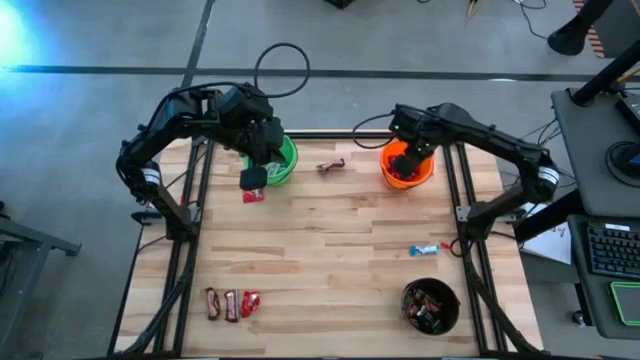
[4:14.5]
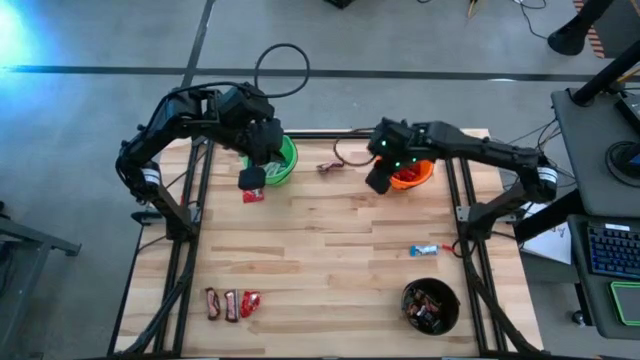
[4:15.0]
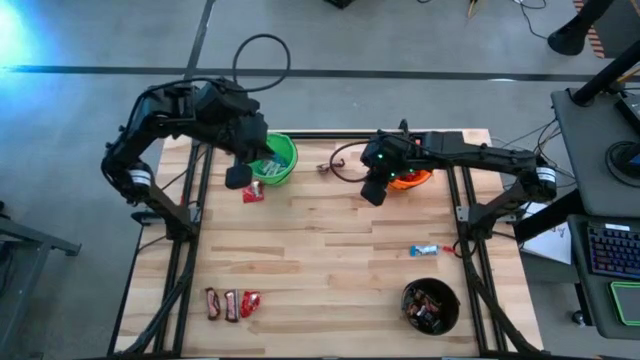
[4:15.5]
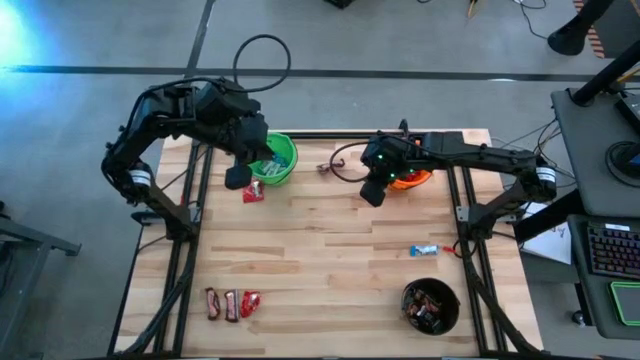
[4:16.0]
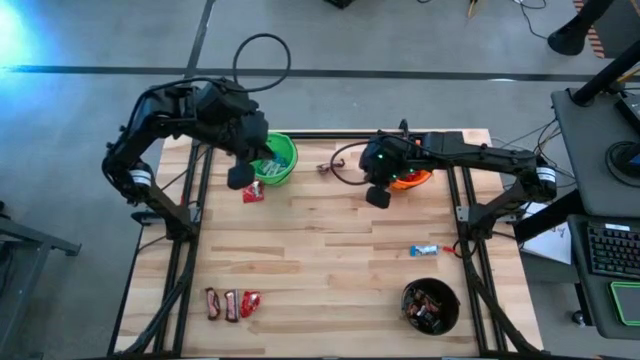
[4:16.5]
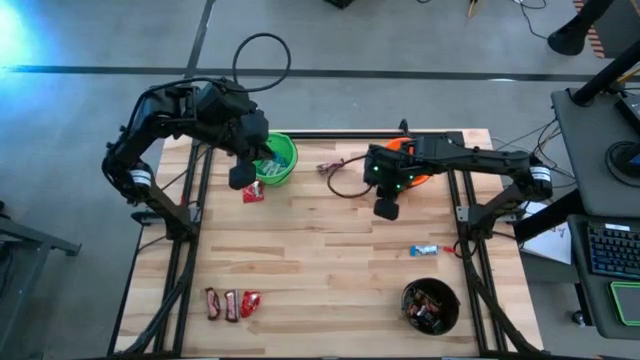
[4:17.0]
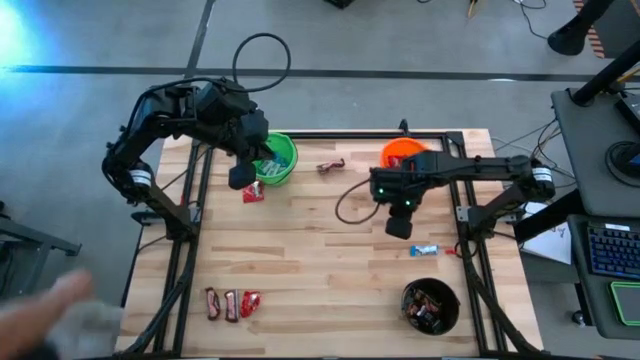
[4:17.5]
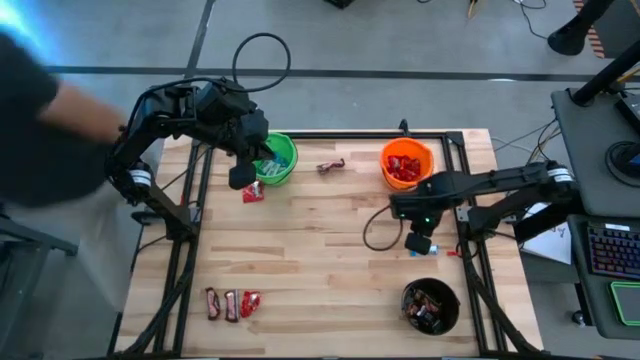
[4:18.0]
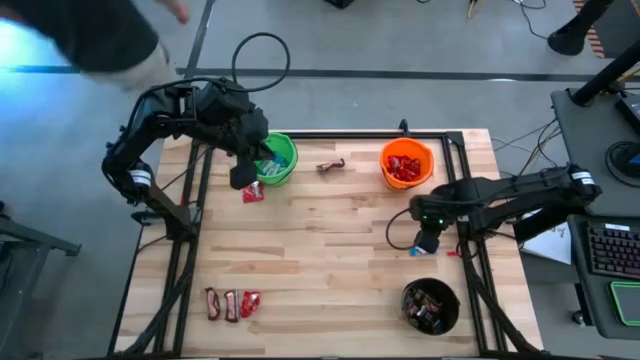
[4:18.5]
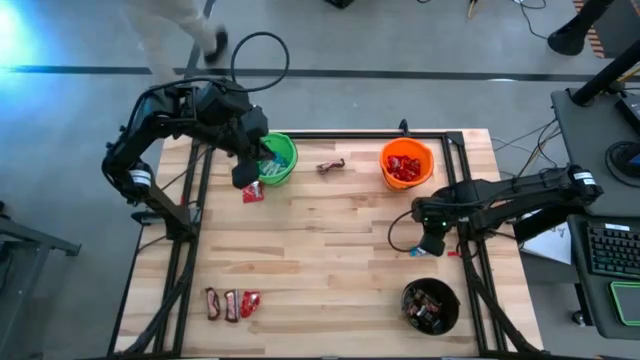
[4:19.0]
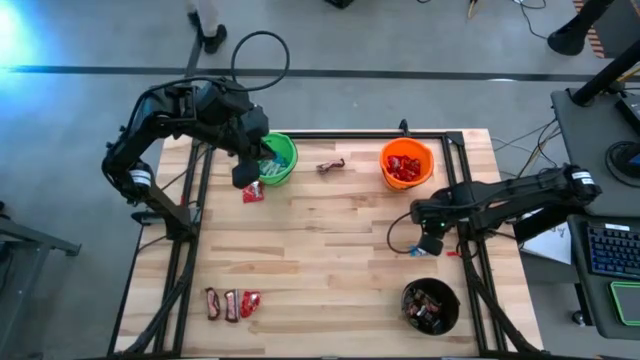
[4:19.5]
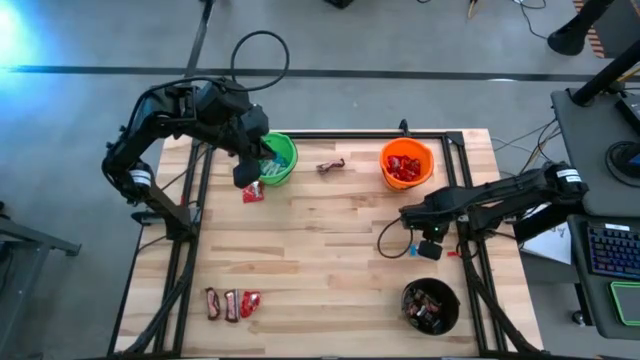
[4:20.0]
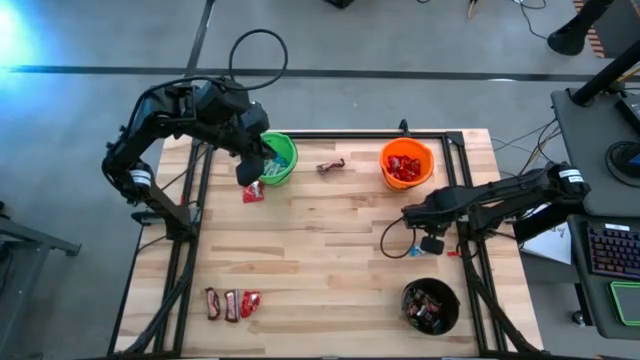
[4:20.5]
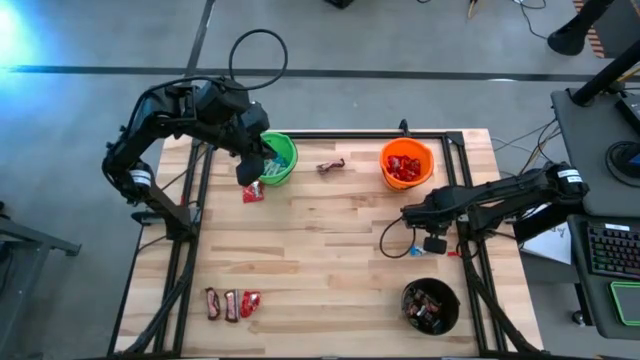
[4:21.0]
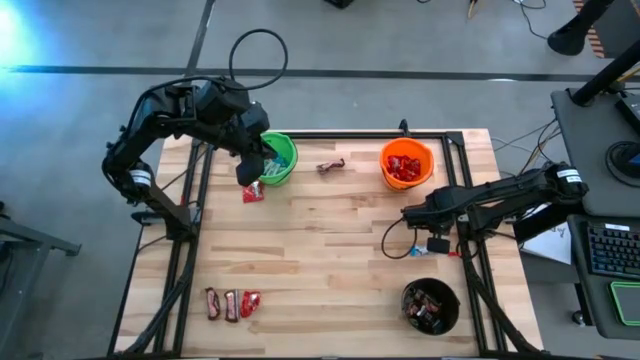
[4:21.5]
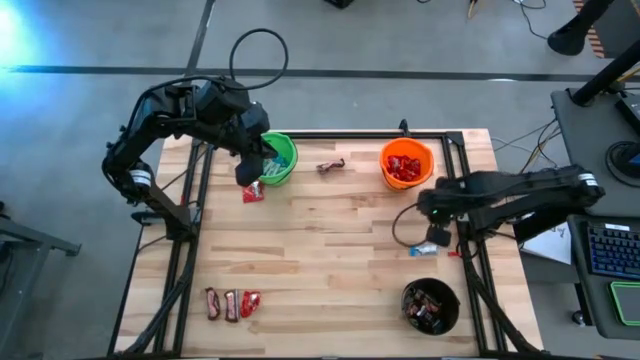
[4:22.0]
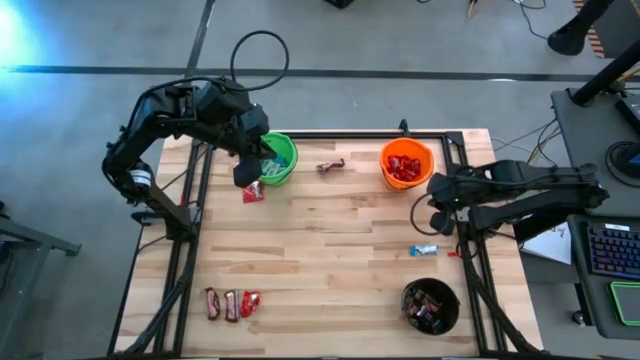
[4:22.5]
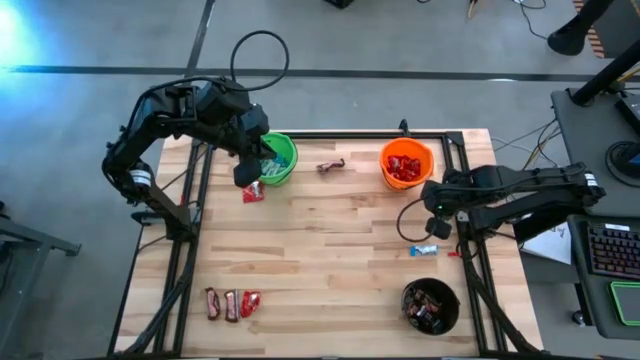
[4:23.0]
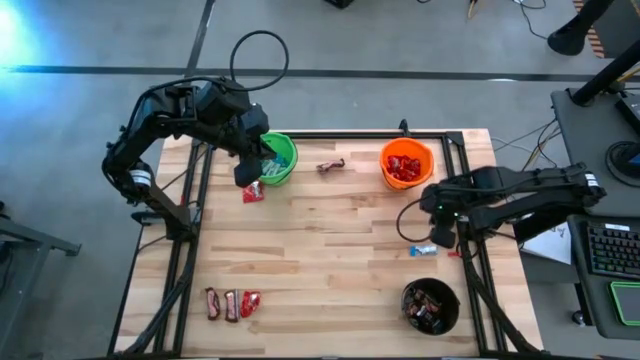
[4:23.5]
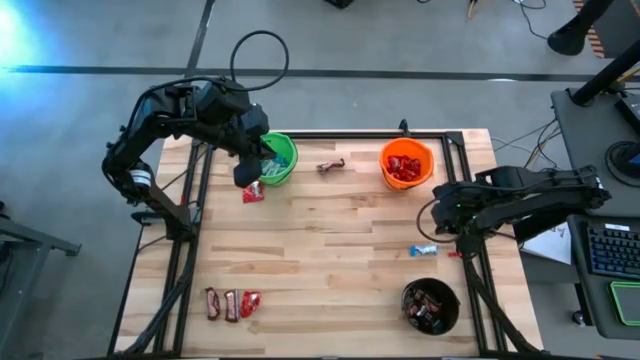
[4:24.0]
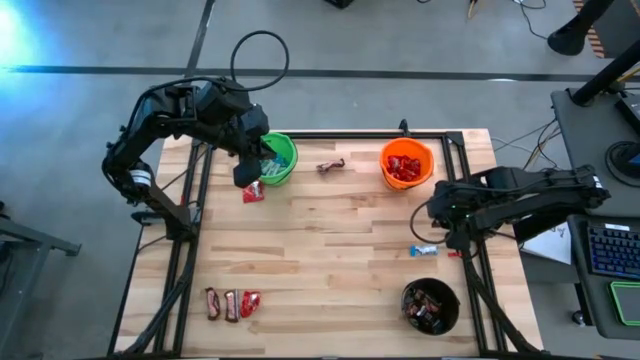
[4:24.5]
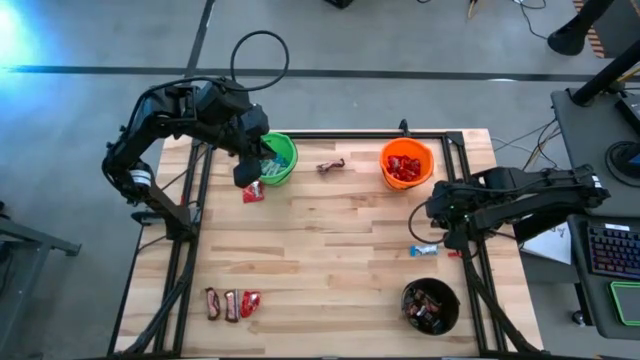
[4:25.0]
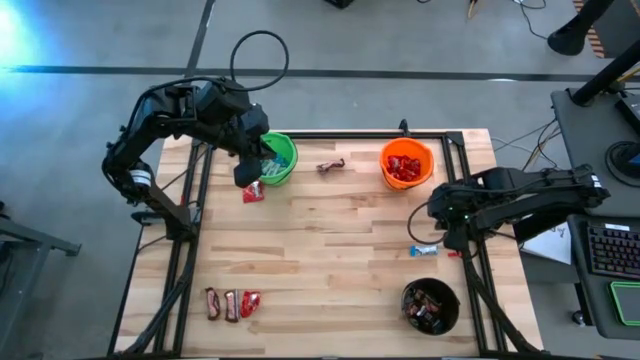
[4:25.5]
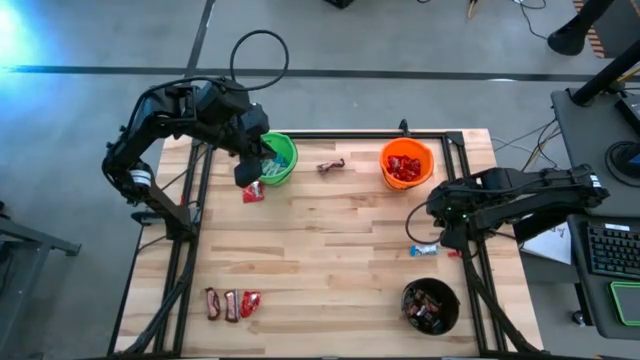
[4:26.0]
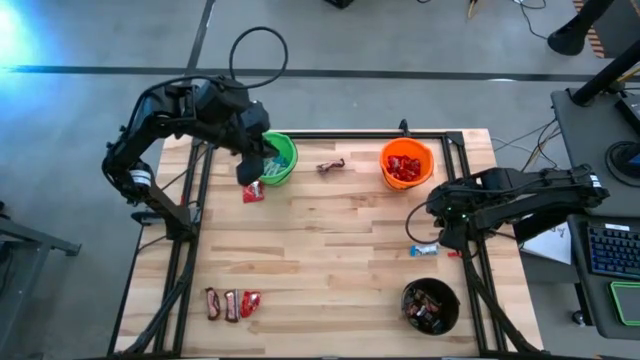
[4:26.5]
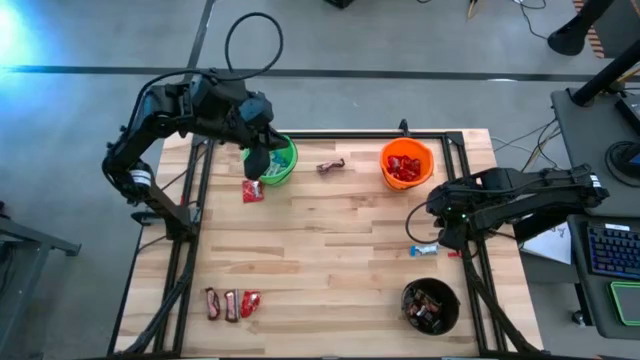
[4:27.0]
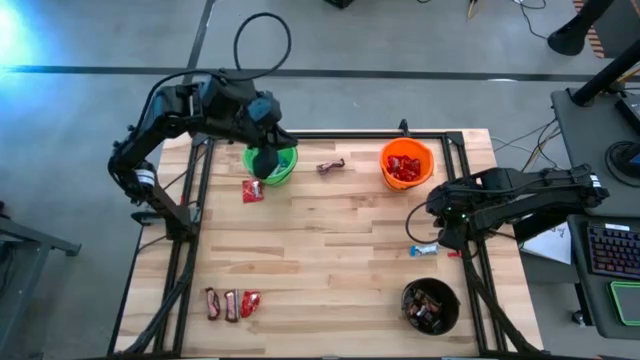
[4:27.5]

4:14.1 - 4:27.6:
Task: Sort candy
Put the white candy into the green bucket

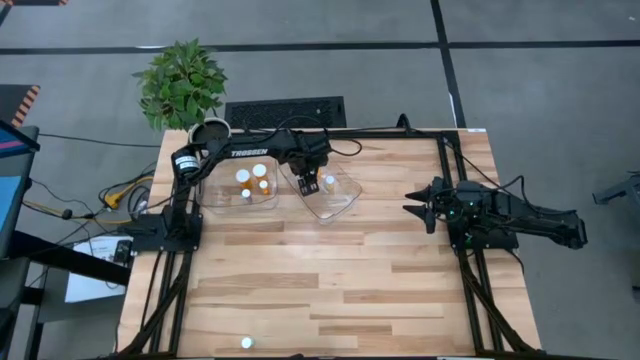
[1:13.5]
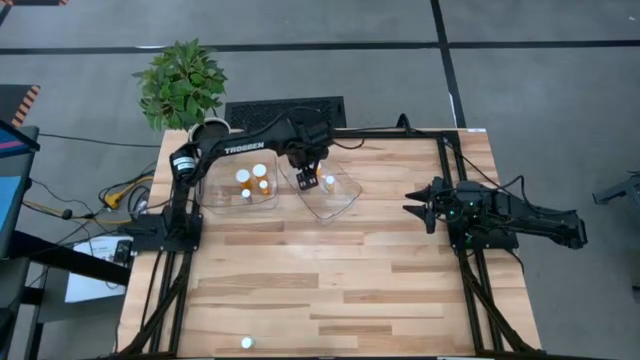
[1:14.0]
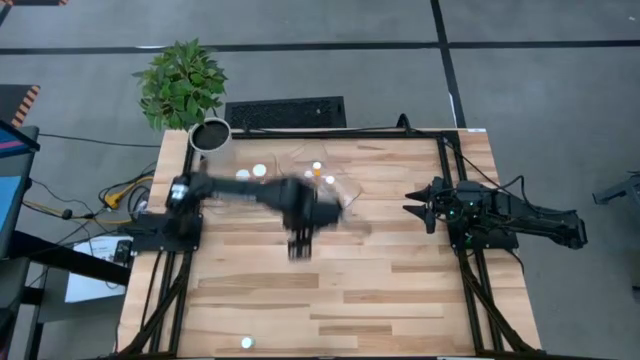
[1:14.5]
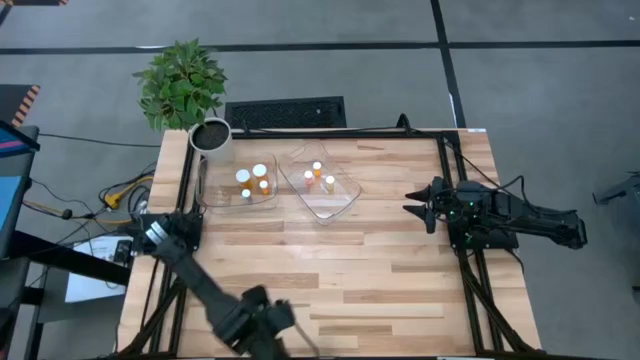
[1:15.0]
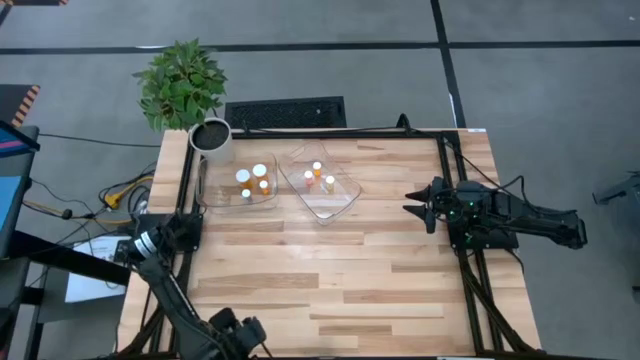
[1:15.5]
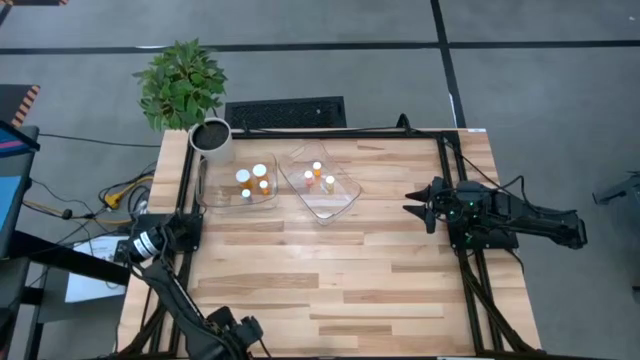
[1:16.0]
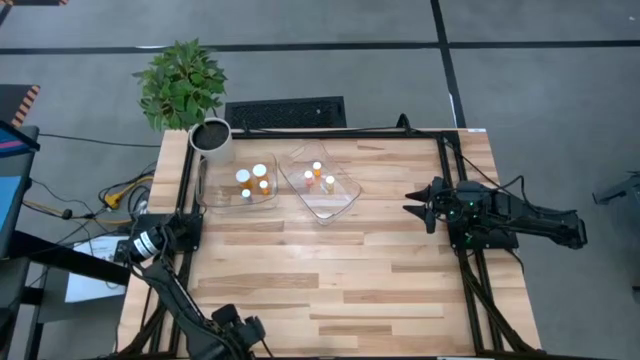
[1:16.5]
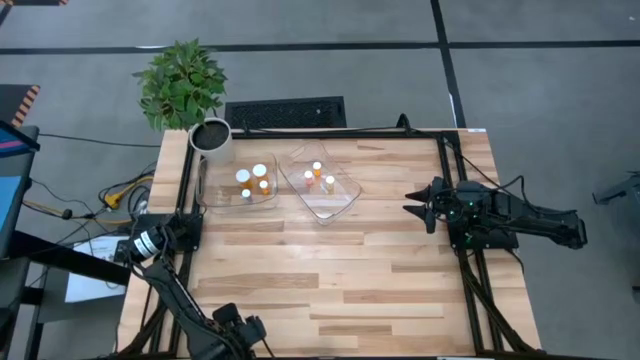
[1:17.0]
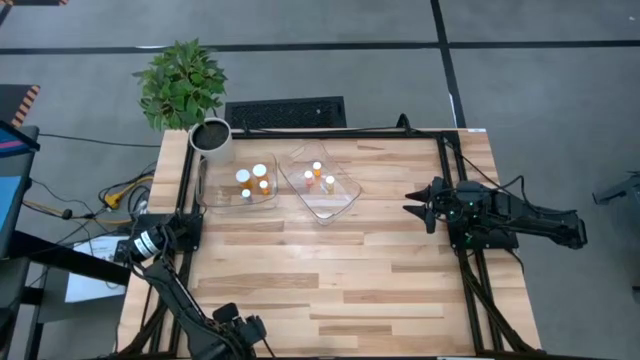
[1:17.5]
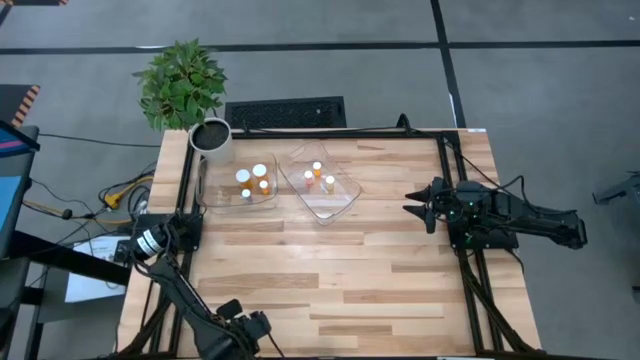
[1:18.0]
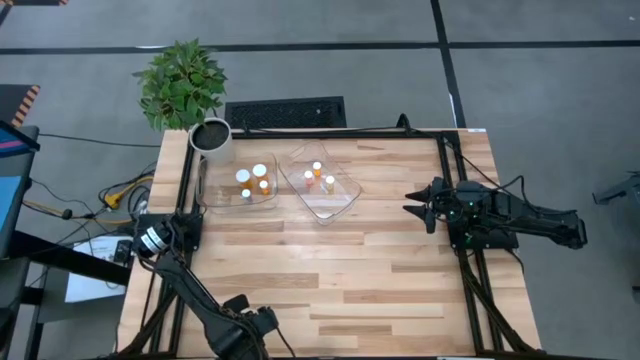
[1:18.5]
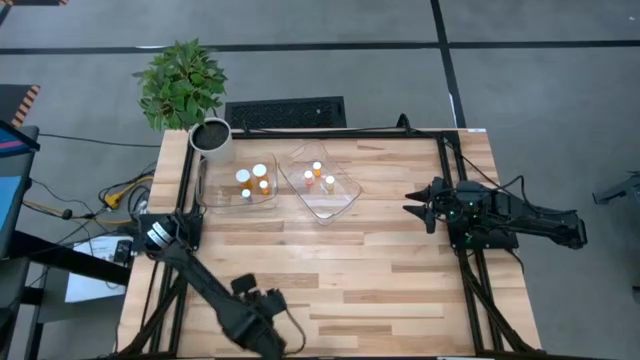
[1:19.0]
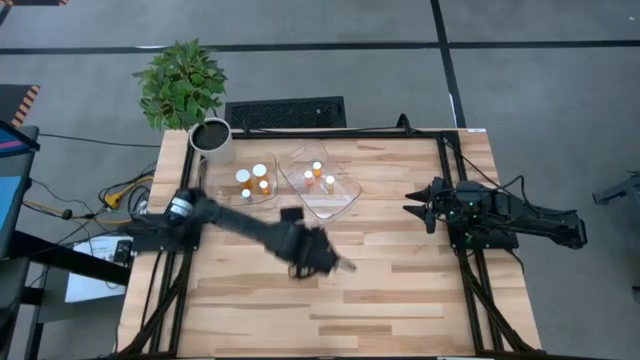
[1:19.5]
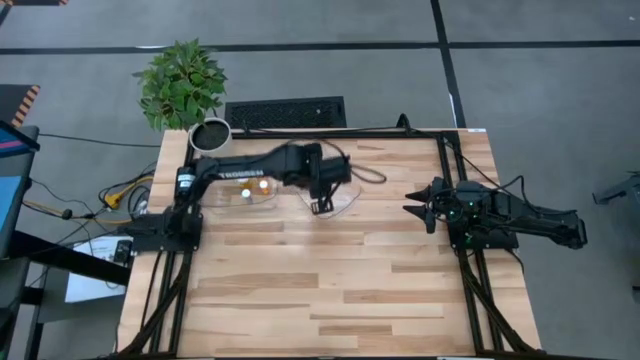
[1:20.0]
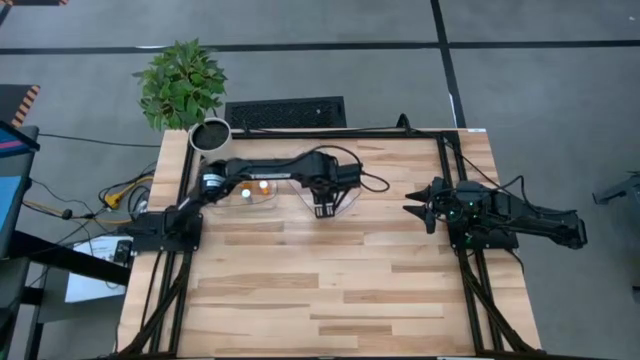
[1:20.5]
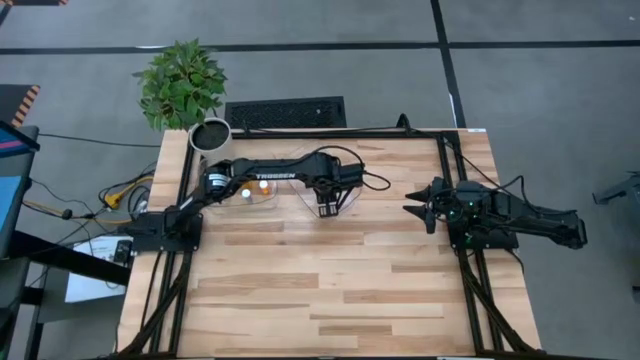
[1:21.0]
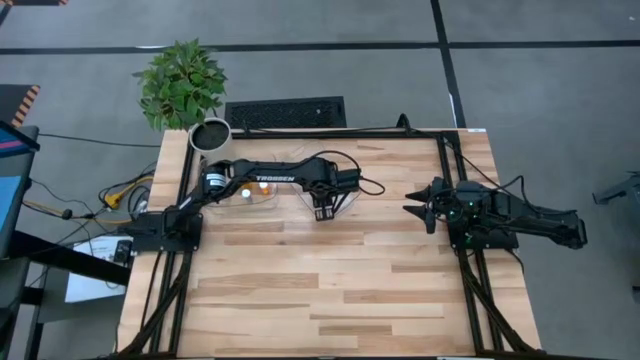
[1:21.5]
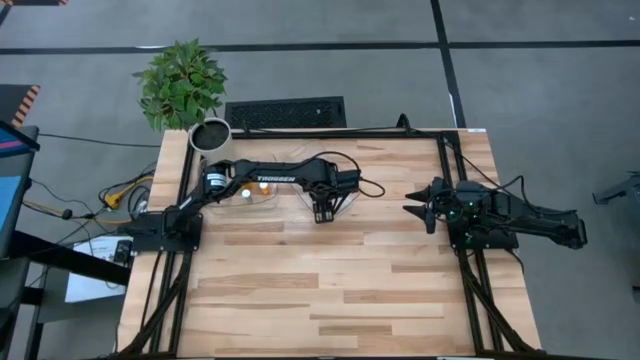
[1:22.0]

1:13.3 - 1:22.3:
Task: Pick and place medicine bottles into bin by pill shape (circle, oval)
Put the small green tablet bottle into the right transparent bin
